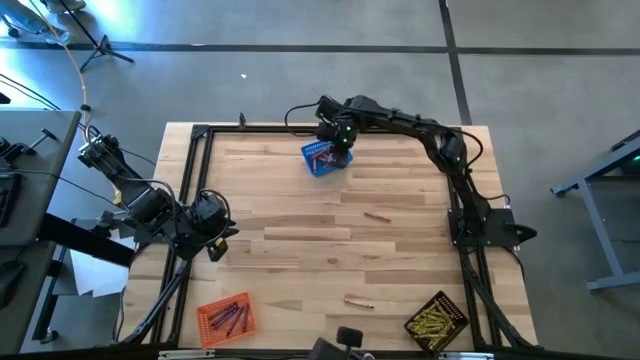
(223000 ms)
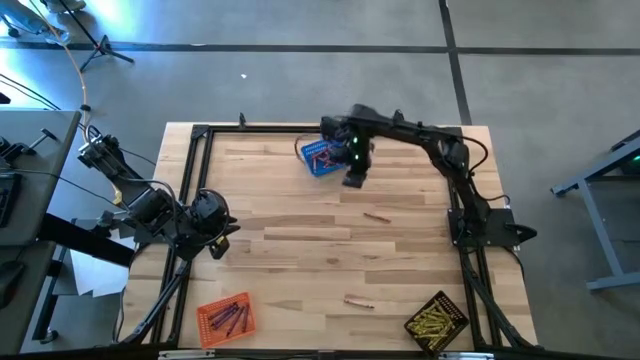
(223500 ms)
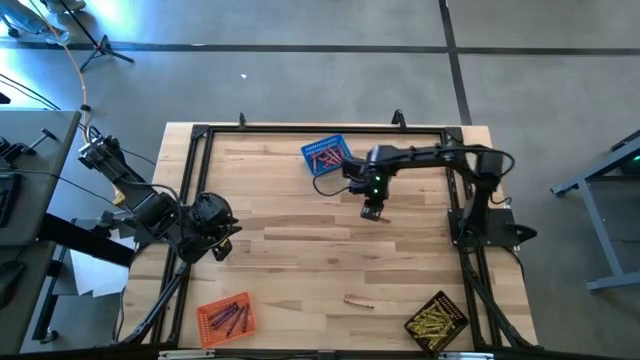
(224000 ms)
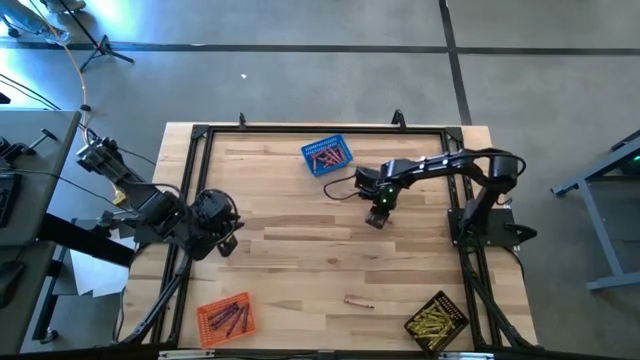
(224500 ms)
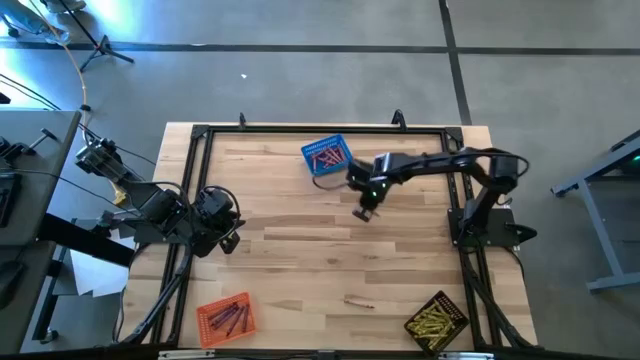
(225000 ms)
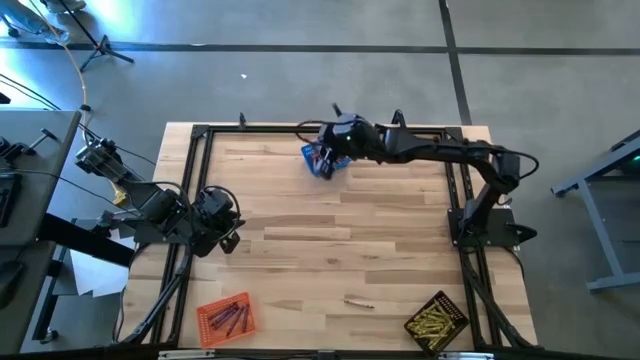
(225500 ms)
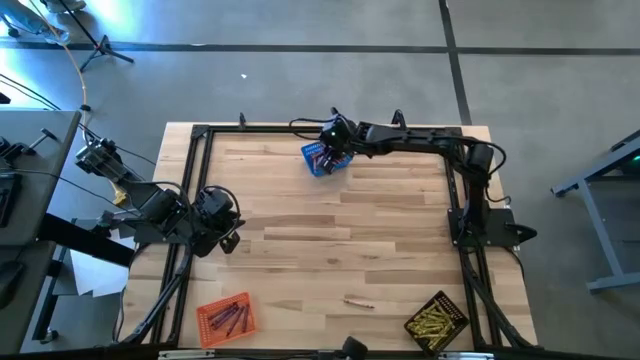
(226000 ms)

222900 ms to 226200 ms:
Task: Sort crayons
Put the red crayon into the blue bin

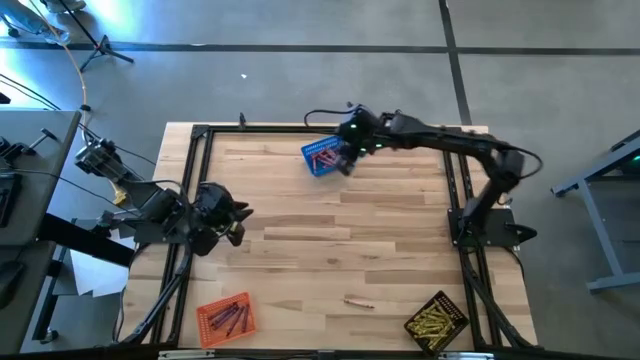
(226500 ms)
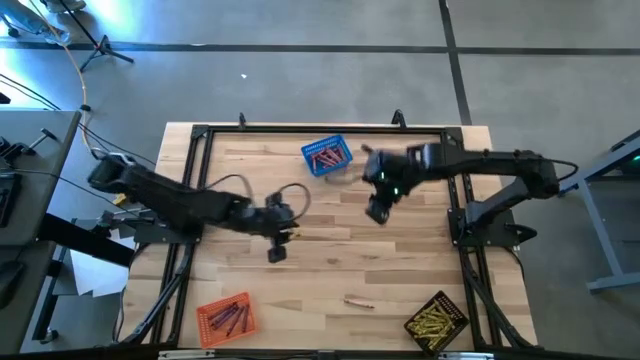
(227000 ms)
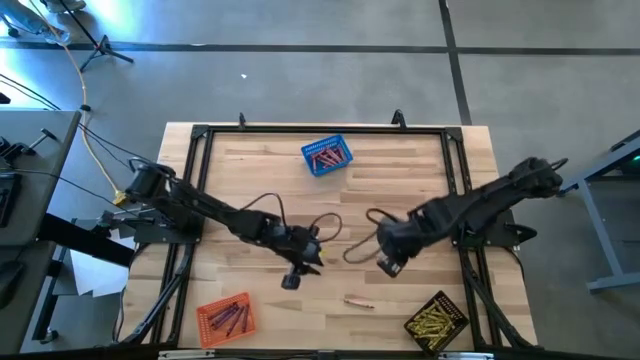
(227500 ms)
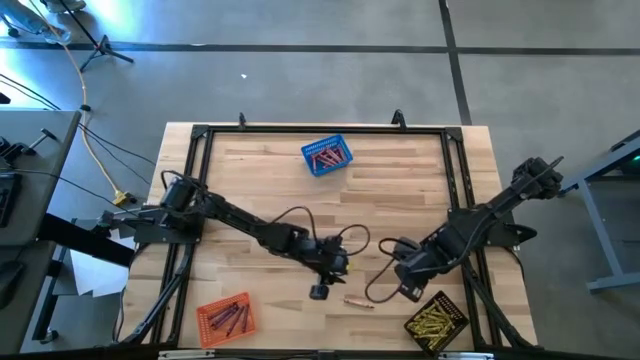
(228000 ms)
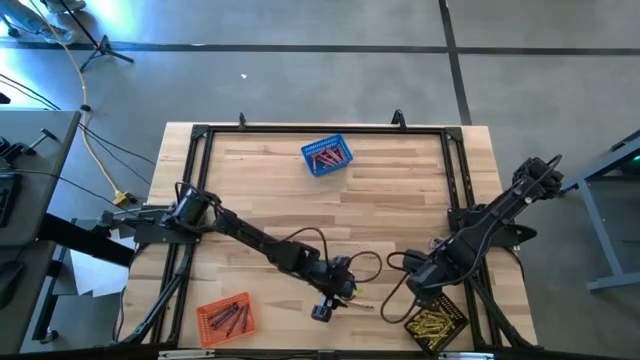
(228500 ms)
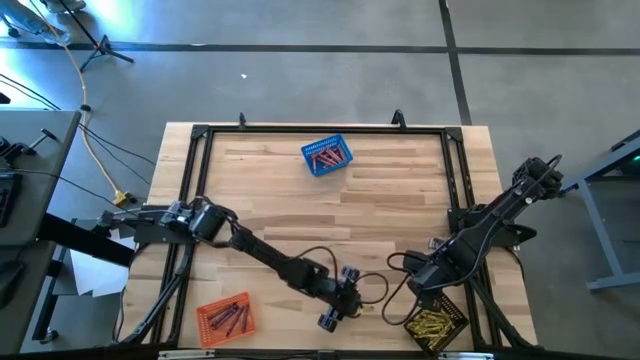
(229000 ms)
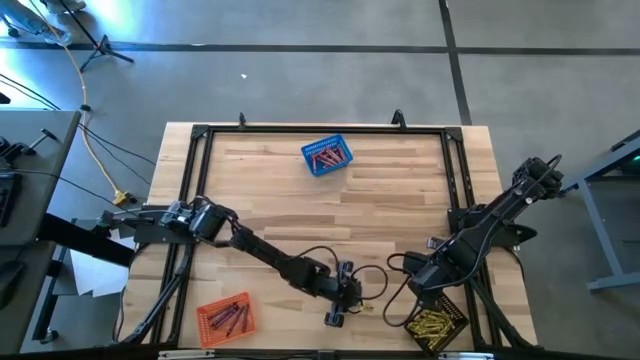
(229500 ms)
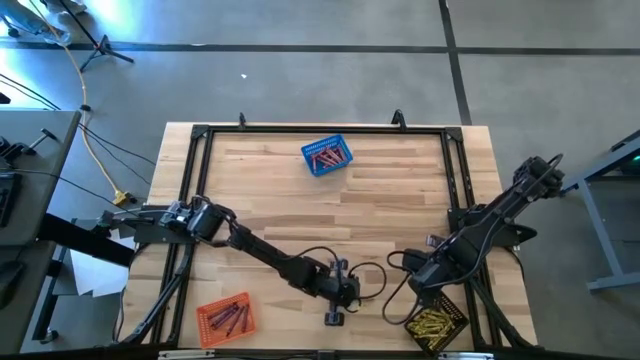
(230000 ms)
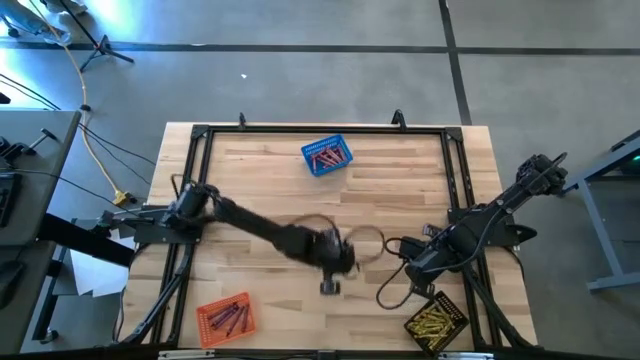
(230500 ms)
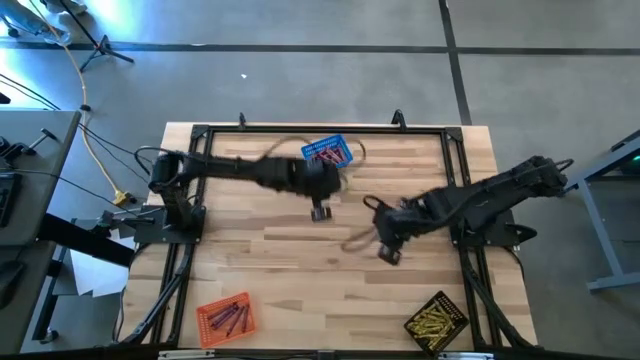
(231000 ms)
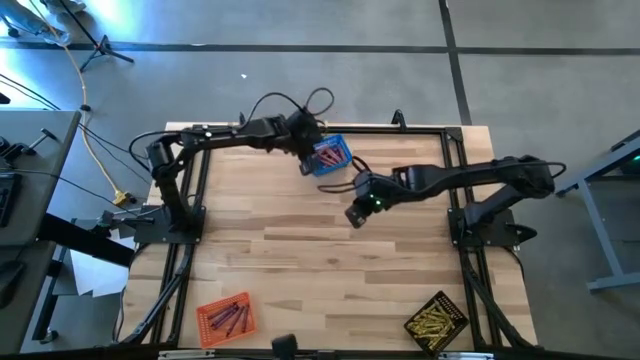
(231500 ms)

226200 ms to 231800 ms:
Put the red crayon into the blue bin

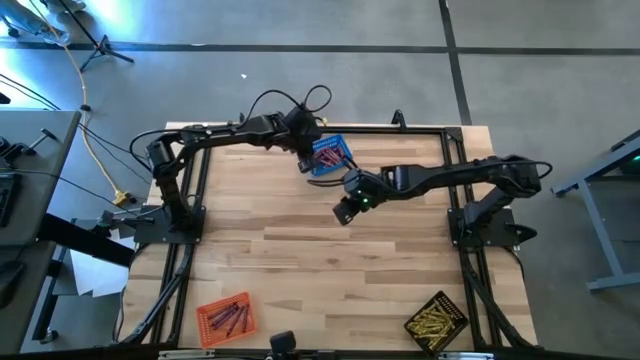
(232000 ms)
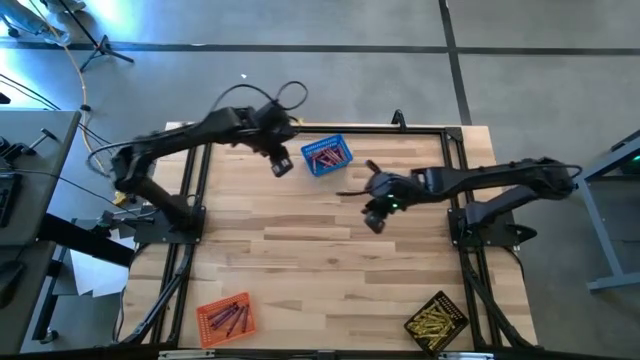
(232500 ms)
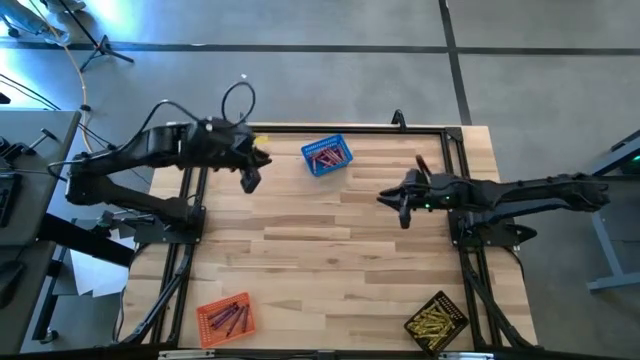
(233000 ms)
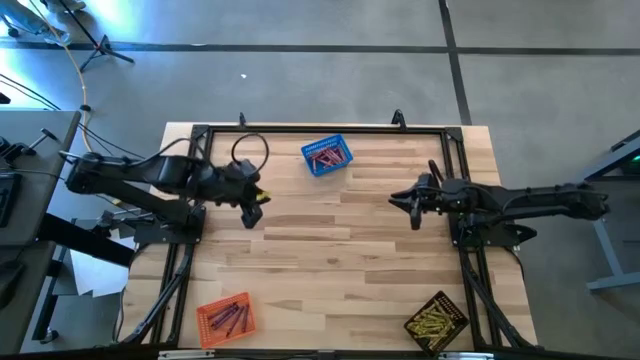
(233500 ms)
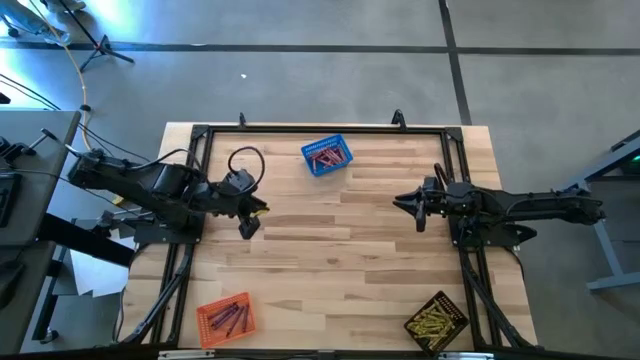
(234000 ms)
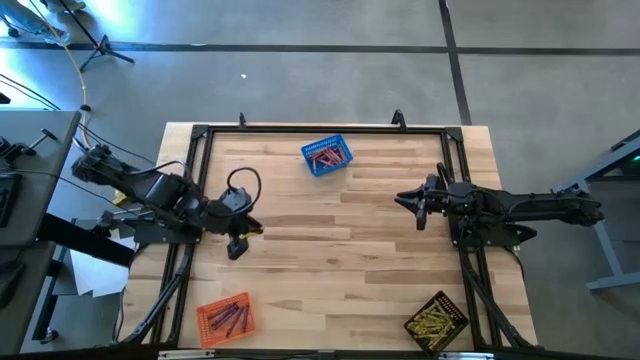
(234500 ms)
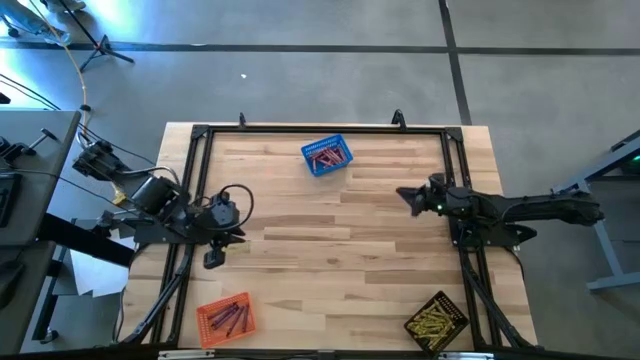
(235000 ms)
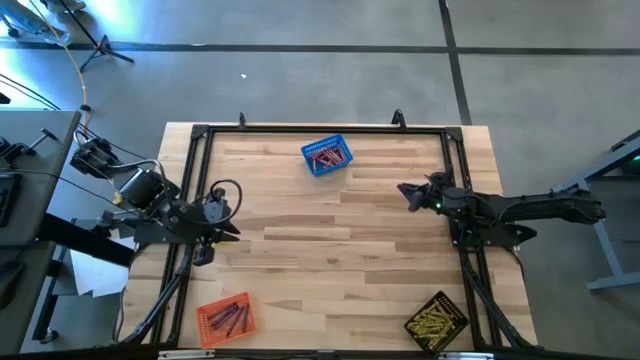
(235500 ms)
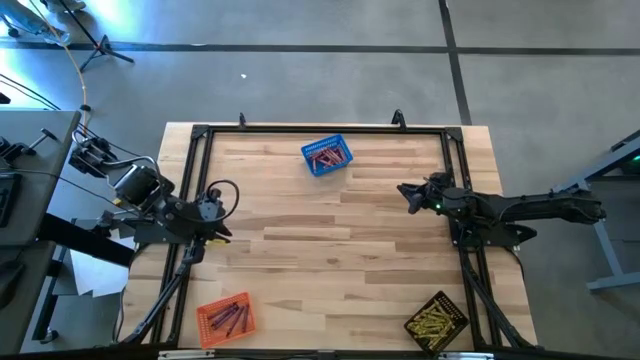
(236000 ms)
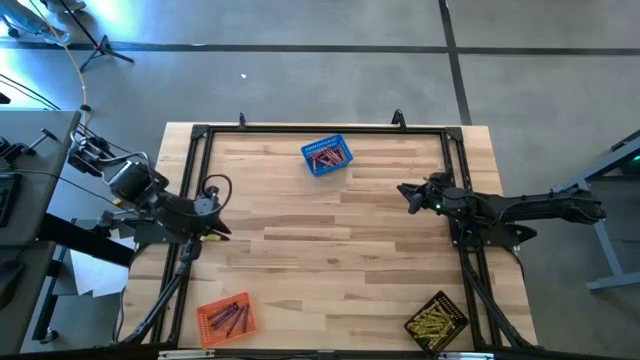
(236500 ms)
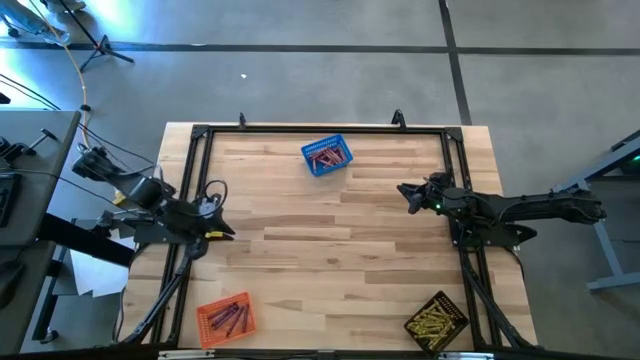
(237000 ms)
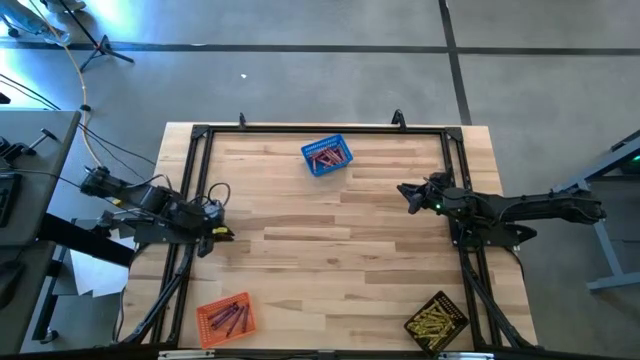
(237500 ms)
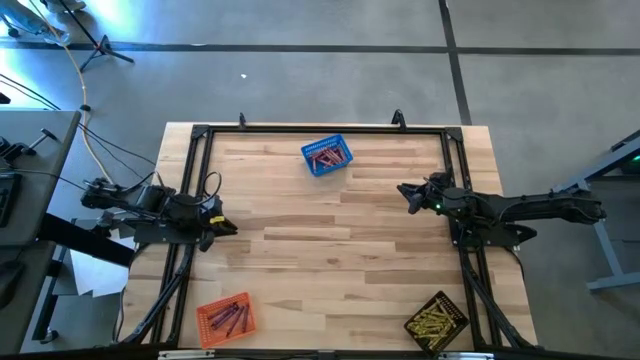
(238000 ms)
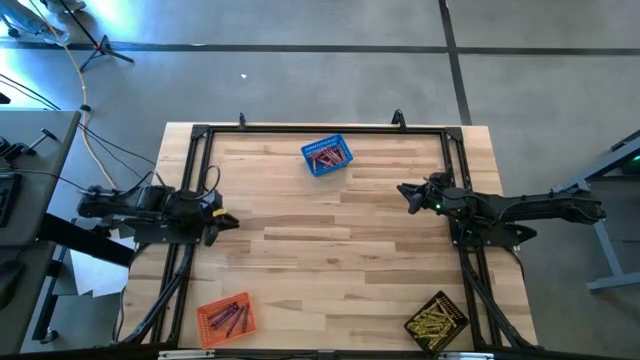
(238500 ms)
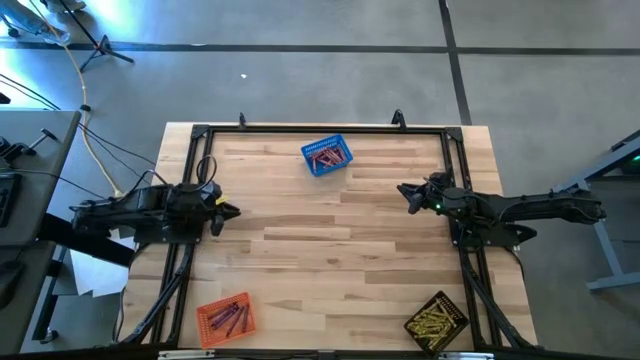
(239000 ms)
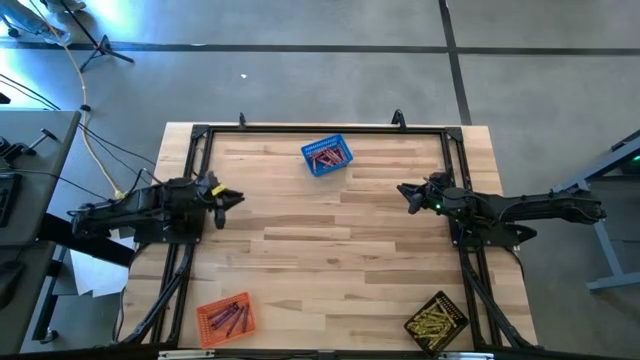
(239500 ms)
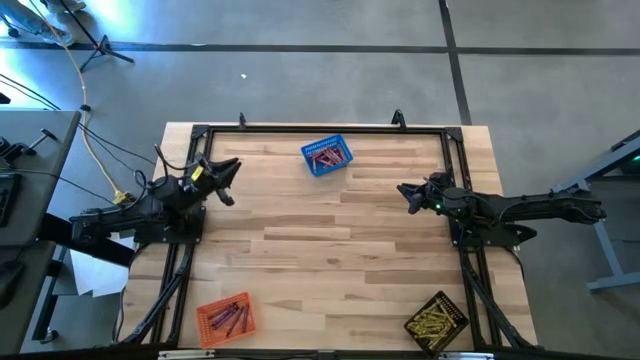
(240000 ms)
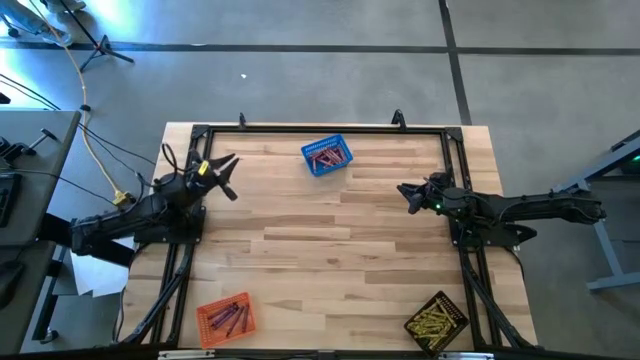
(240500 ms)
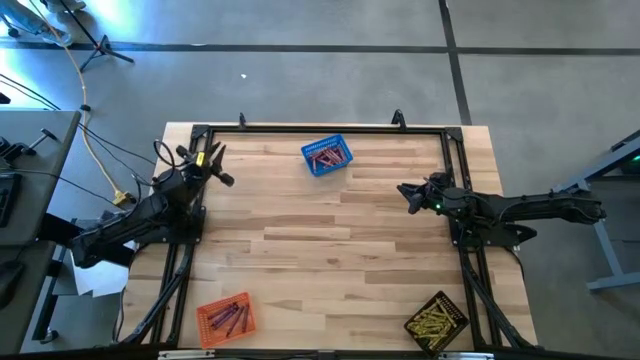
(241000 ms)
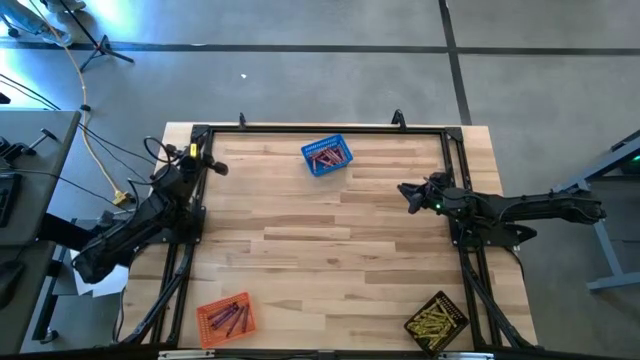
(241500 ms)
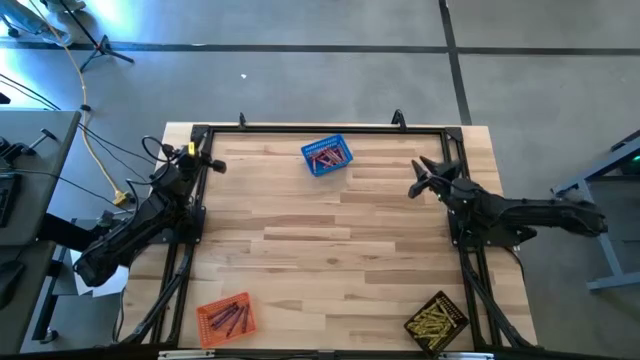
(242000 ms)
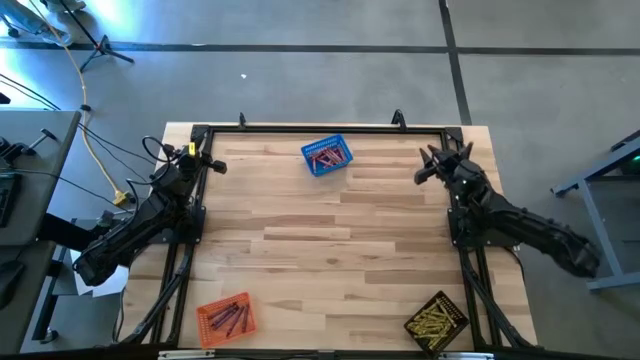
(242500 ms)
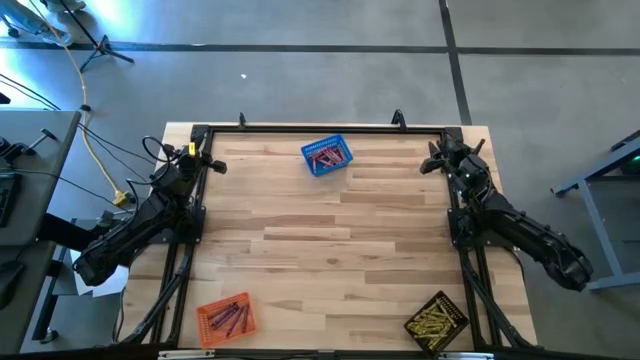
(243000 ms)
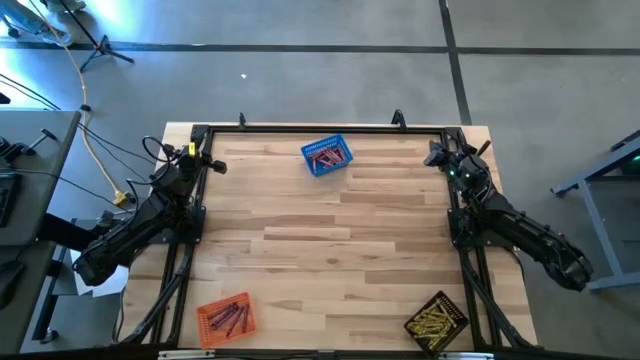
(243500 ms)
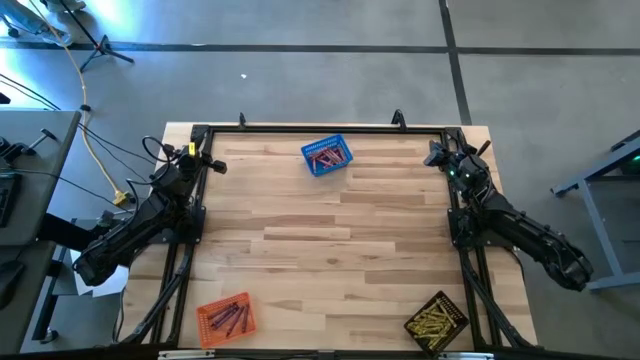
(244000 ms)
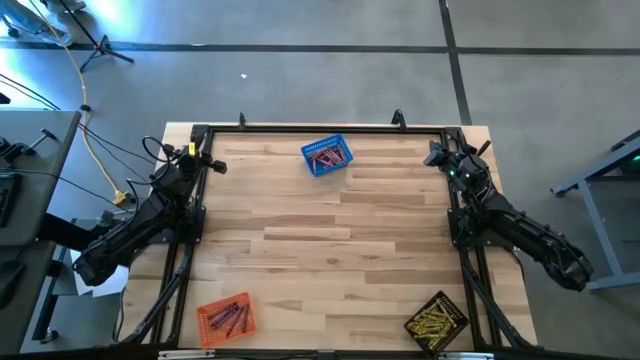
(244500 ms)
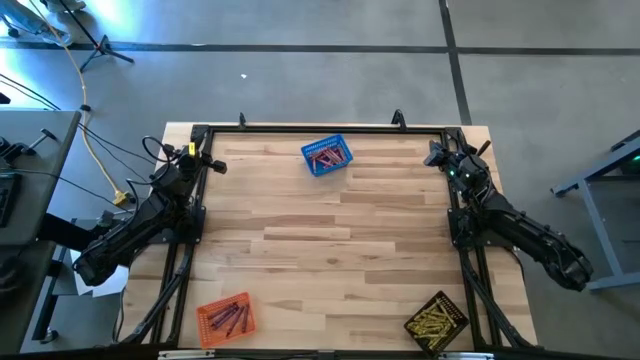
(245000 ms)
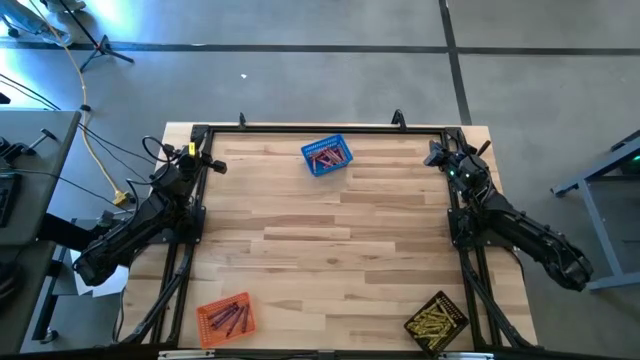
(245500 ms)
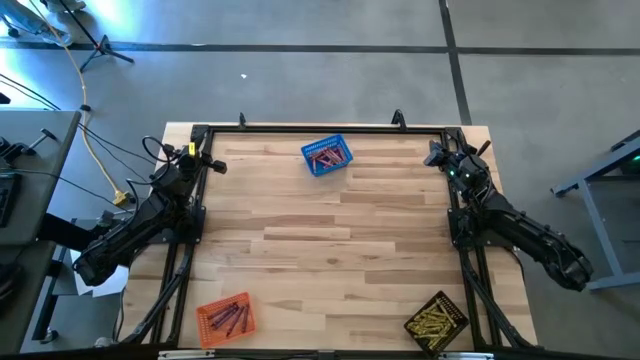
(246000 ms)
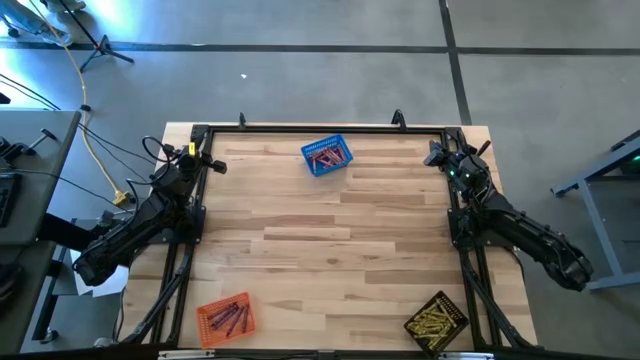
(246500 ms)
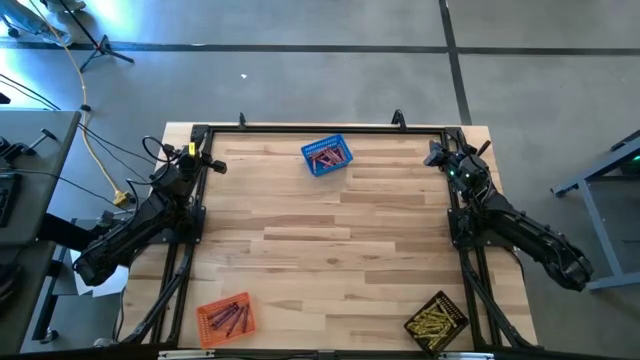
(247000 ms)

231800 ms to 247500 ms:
Return to Home Position
